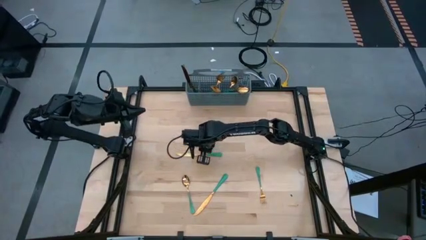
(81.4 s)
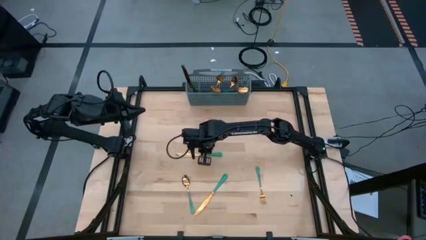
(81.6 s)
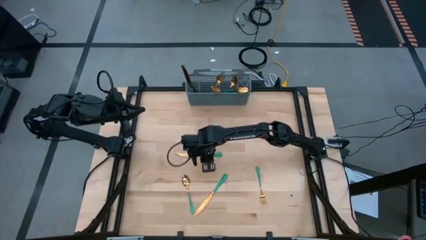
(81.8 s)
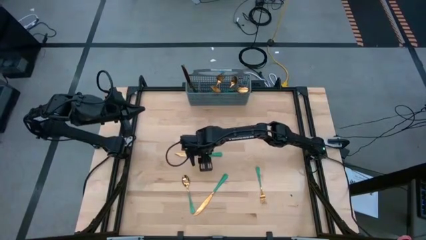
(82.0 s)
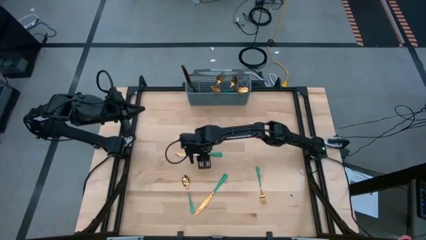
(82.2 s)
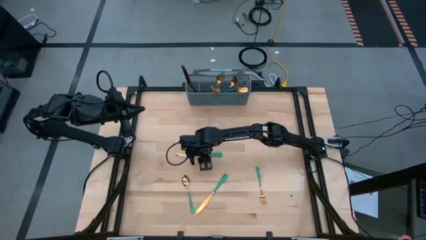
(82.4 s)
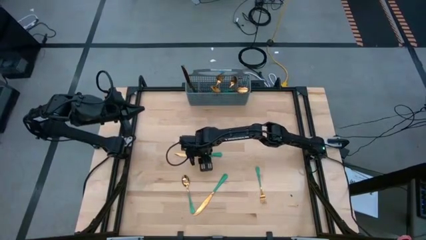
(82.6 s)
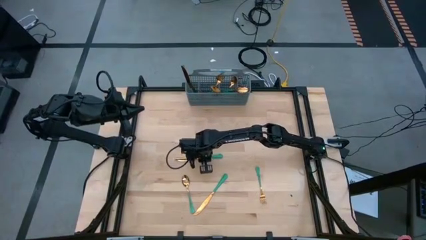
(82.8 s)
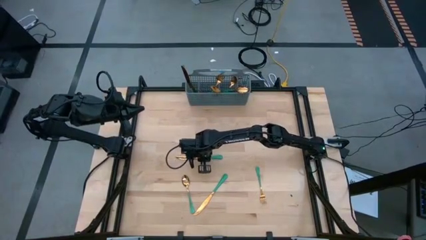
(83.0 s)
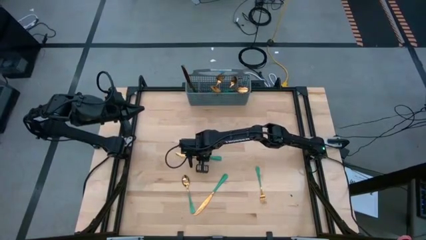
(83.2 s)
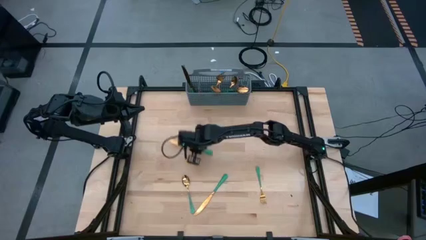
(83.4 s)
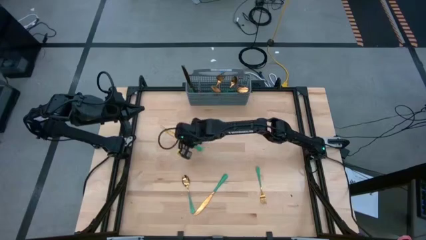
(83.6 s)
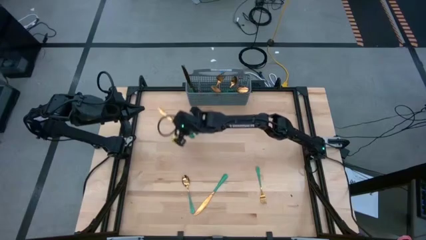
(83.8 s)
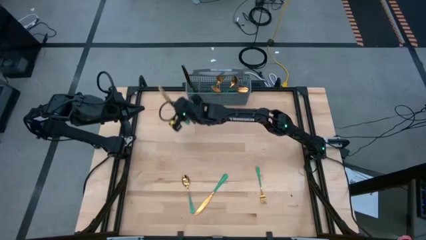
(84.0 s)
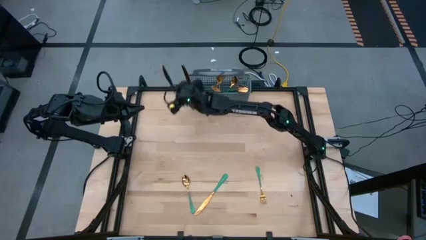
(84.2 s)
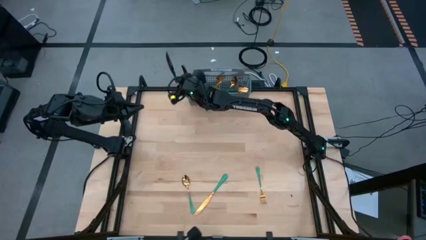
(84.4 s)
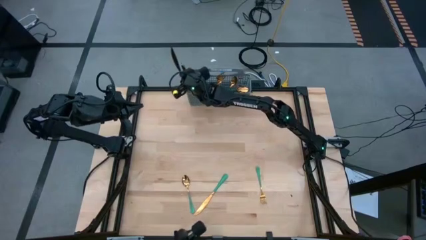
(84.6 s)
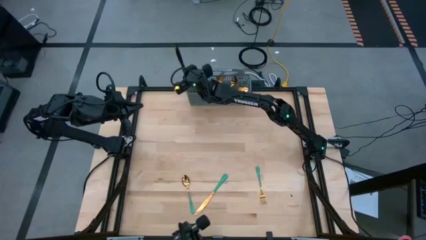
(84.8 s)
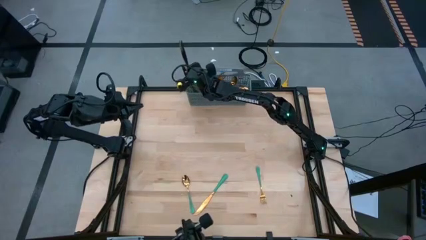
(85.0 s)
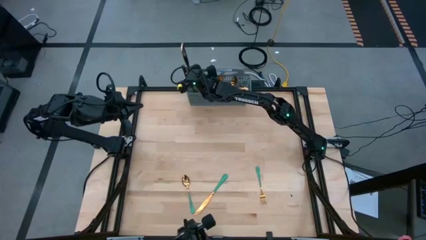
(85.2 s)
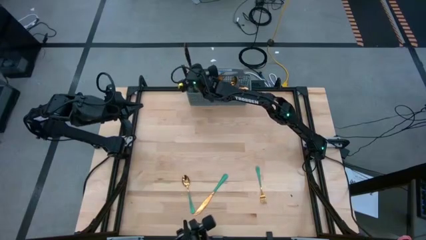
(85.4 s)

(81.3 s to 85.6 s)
Task: Sort silverware
Put the green knife into the gray silverware organizer

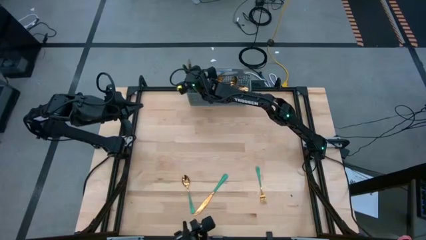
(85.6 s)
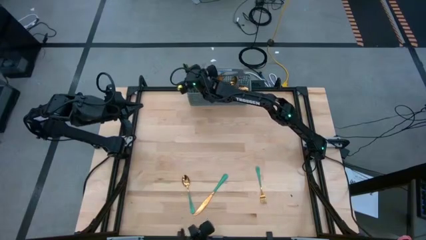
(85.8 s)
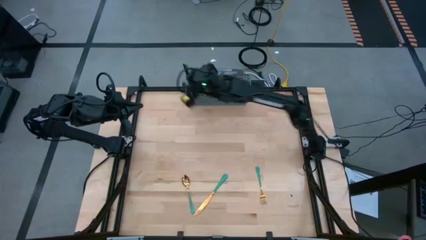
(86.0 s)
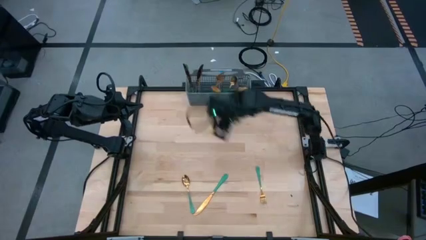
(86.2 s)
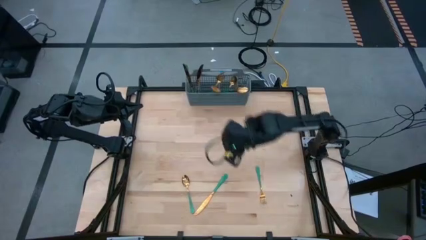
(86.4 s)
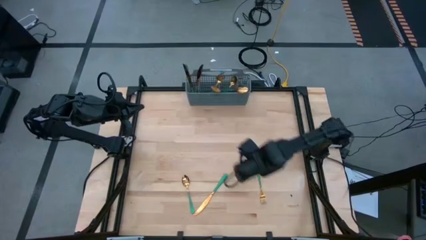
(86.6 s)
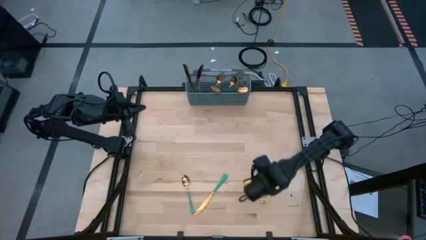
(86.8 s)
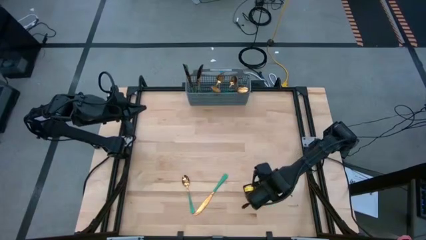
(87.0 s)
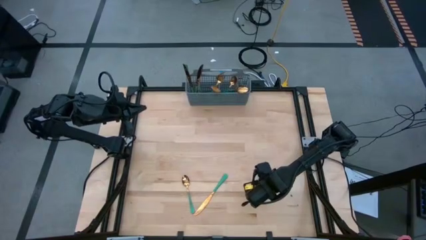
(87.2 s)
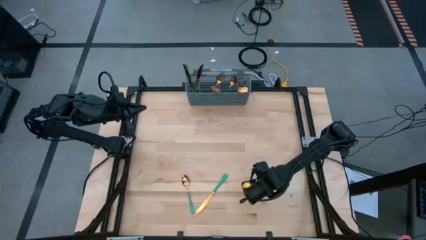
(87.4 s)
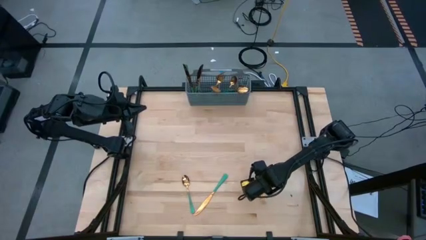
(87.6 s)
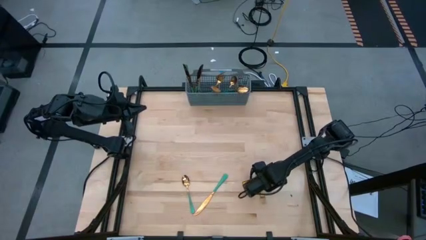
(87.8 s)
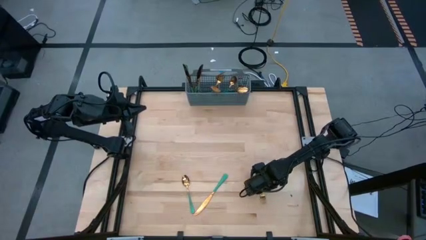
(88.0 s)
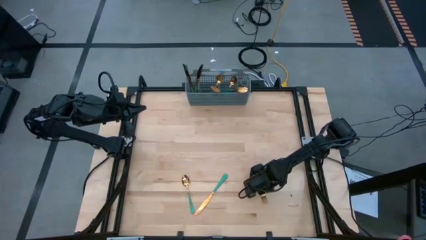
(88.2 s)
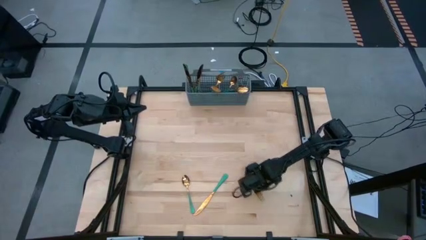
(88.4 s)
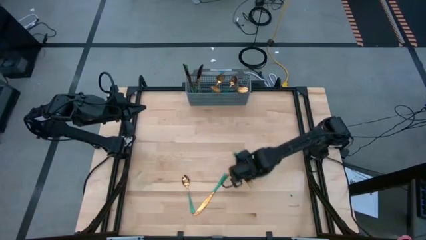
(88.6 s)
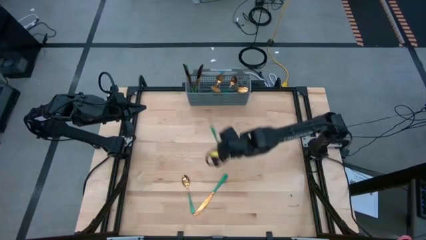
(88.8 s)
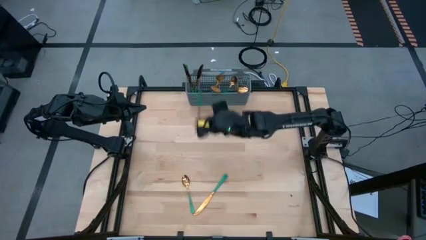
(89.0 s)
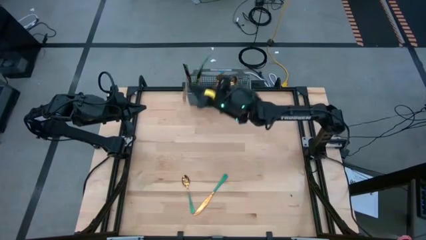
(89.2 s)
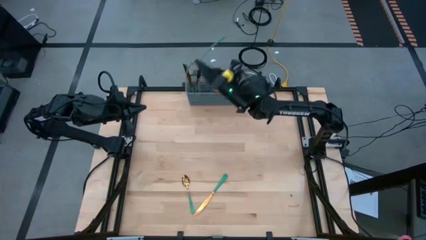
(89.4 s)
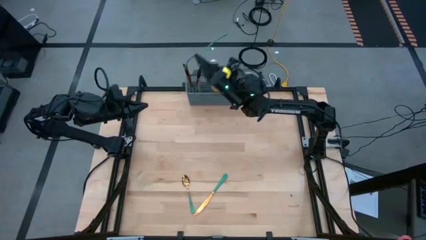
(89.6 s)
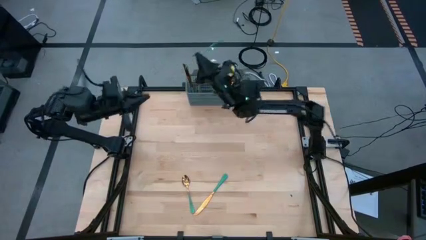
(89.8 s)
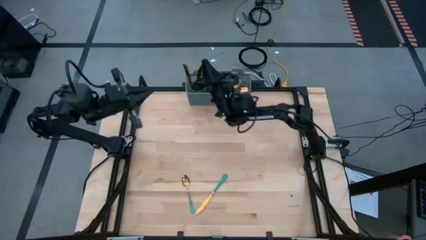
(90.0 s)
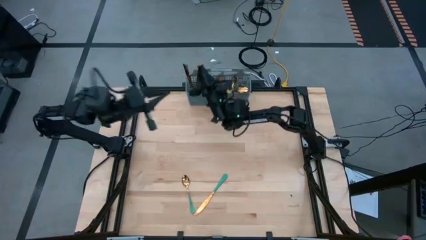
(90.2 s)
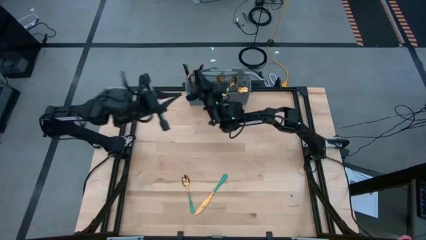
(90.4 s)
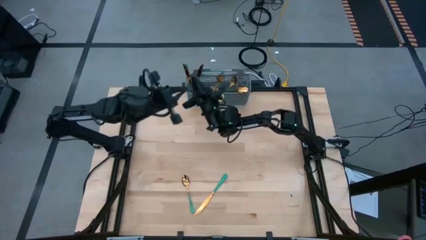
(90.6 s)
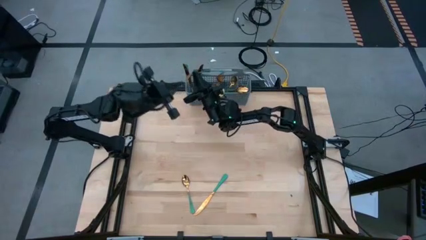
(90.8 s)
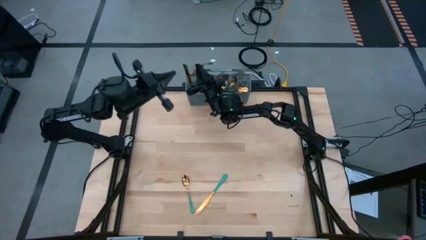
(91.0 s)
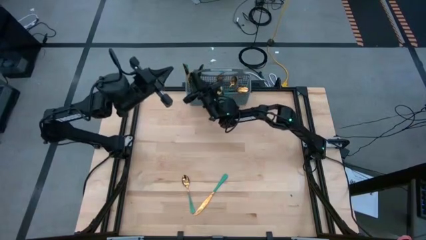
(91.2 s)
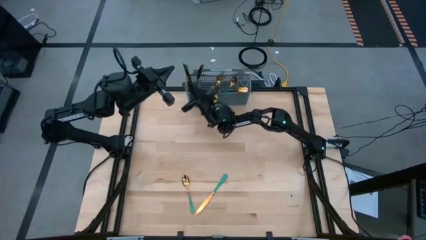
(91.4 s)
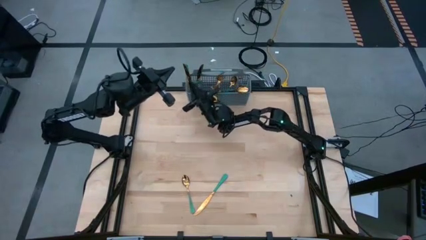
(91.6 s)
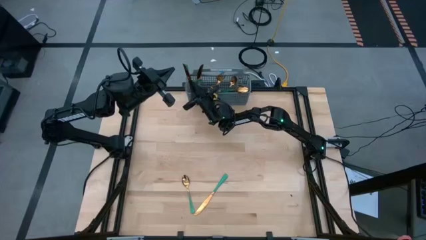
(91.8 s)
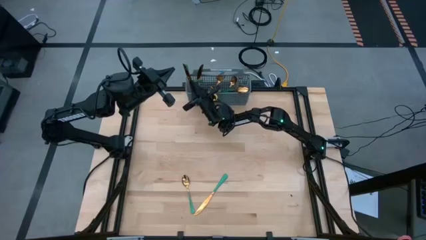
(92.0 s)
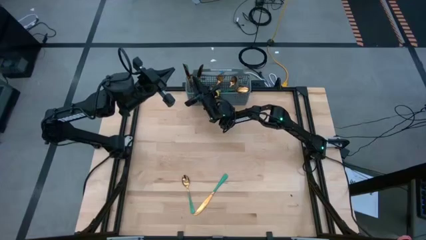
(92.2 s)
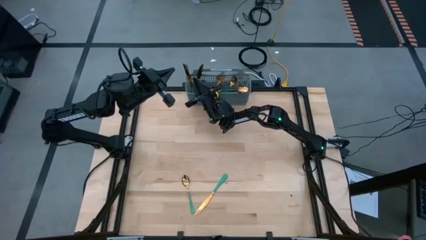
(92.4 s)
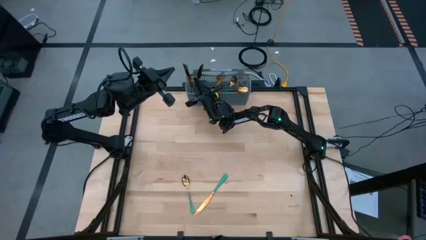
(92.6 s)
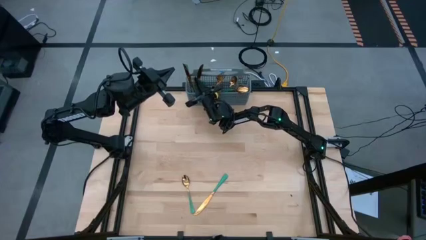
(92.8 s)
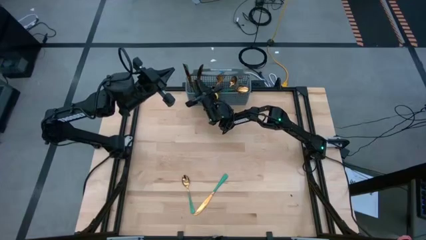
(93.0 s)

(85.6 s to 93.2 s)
Put the green fork into the gray silverware organizer

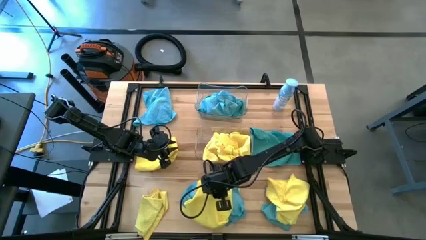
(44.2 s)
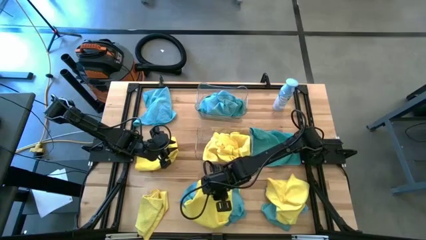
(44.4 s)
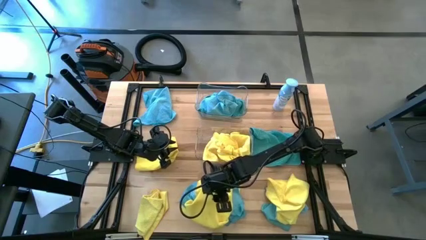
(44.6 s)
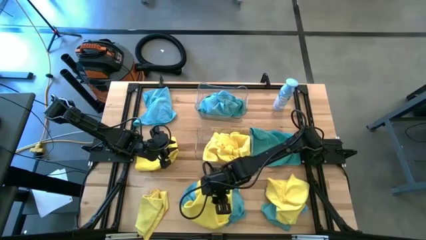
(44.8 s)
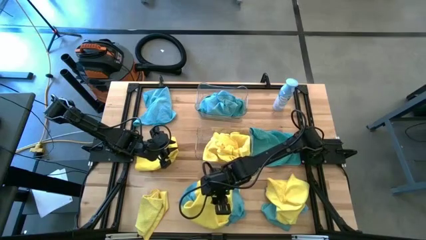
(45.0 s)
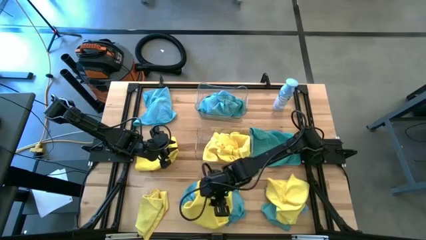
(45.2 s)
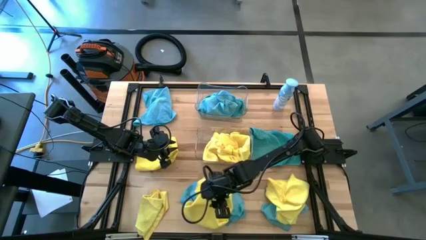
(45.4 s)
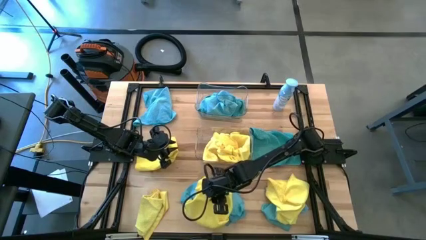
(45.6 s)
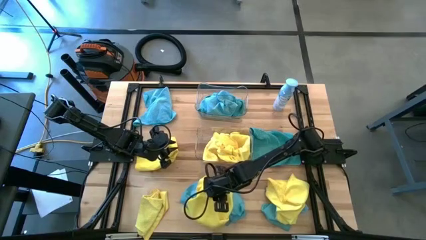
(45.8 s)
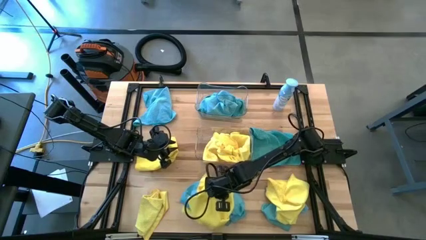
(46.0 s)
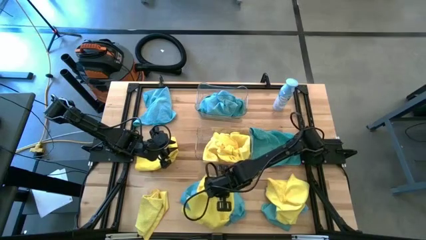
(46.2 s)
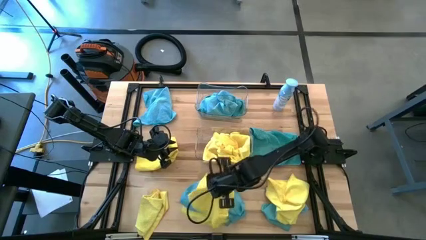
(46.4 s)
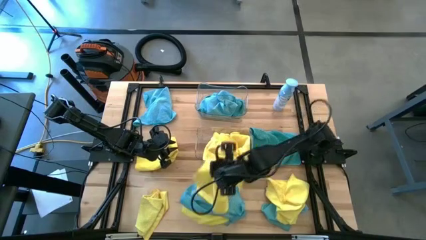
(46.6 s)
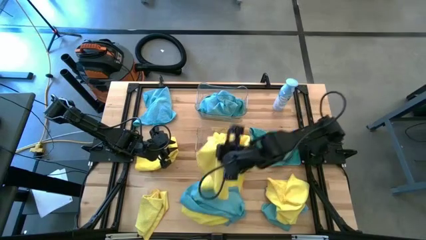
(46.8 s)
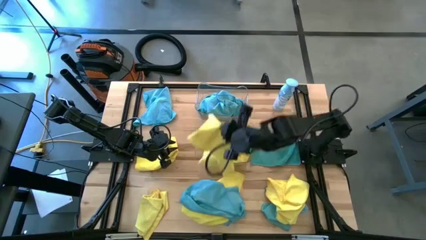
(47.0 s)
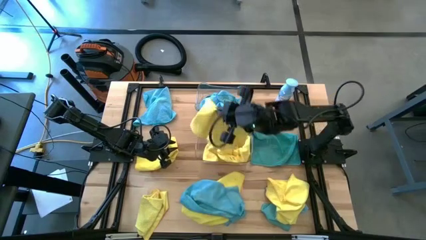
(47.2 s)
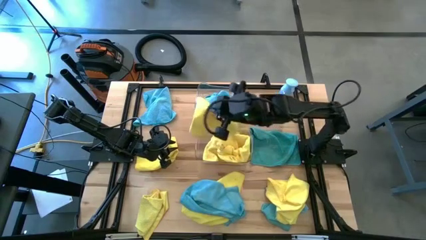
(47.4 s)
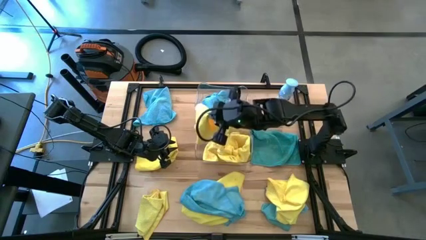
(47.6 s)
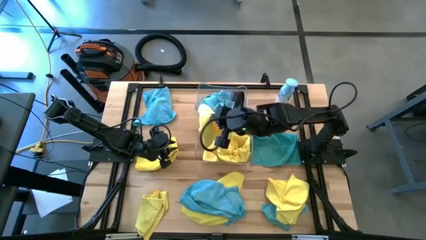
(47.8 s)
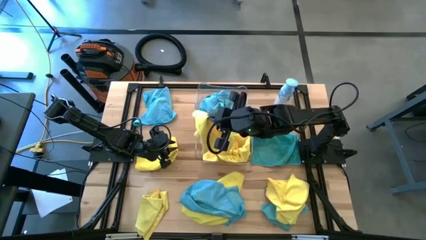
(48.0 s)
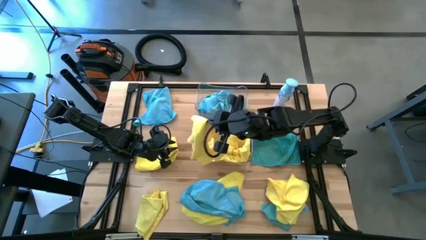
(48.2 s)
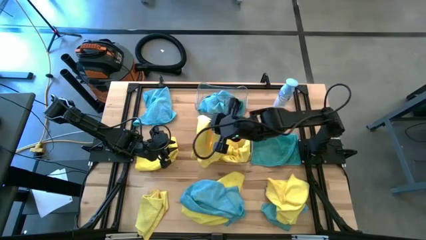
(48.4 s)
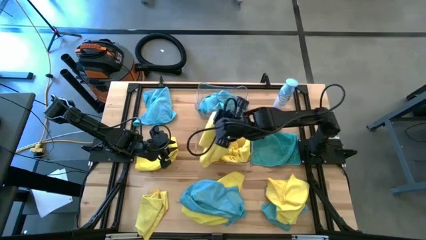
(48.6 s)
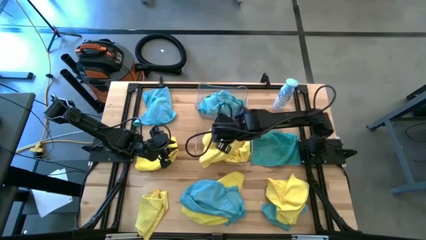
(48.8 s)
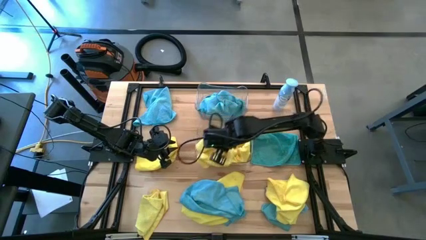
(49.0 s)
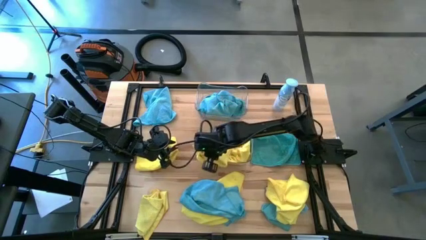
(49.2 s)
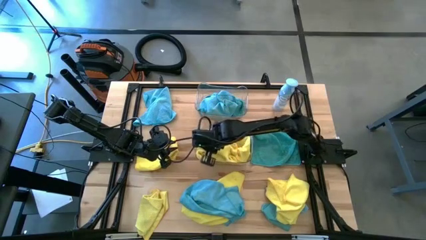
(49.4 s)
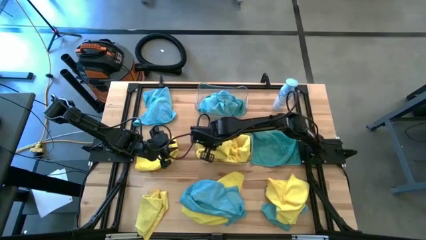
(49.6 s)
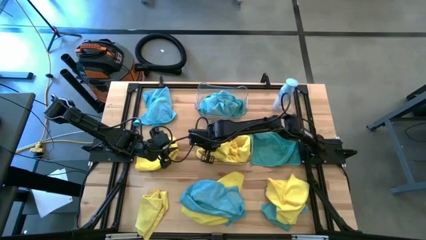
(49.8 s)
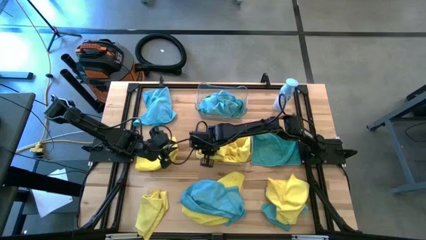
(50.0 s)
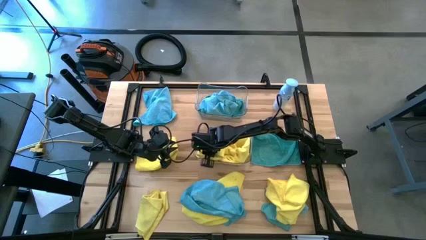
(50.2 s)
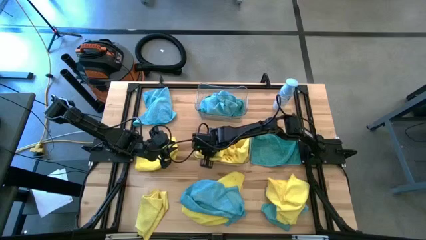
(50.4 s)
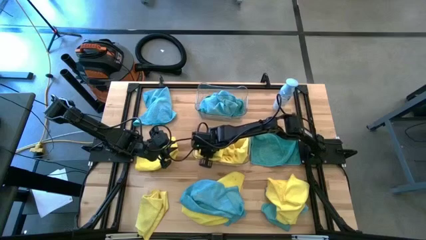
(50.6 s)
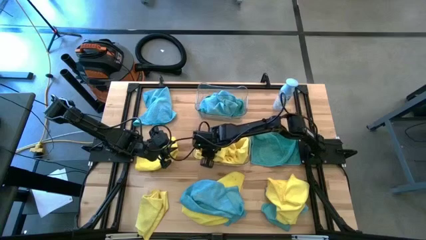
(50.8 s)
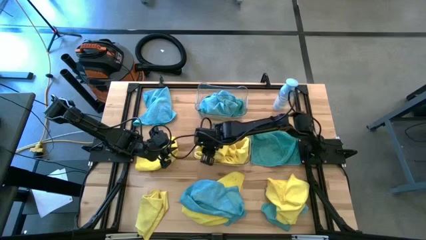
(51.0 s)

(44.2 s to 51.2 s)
Task: Sort microfiber towel by color & place in baskets
Put the yellow towel into the bottom transparent bin
